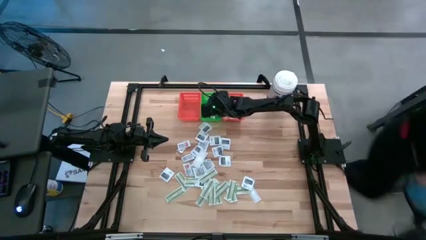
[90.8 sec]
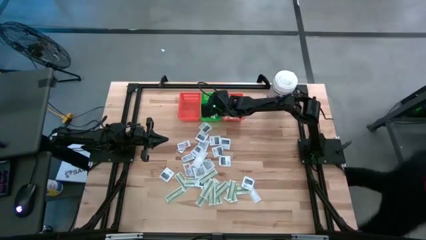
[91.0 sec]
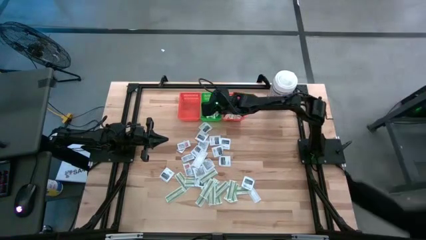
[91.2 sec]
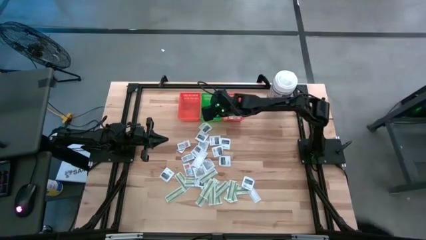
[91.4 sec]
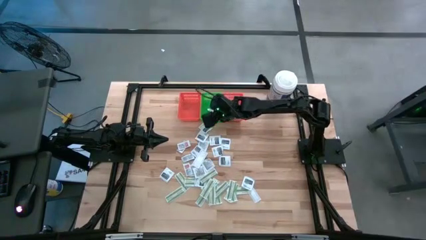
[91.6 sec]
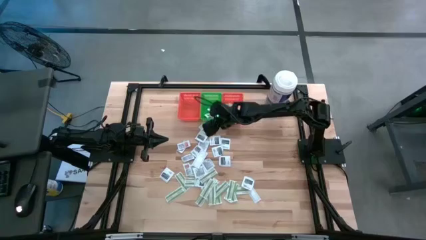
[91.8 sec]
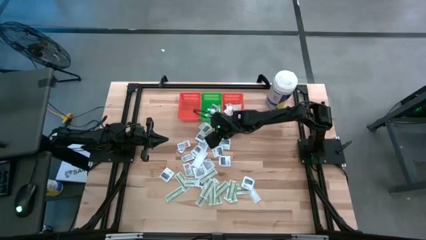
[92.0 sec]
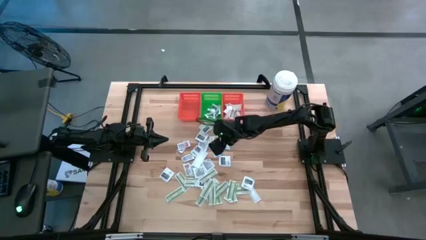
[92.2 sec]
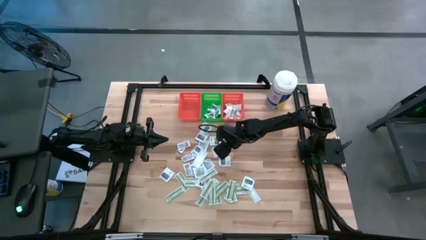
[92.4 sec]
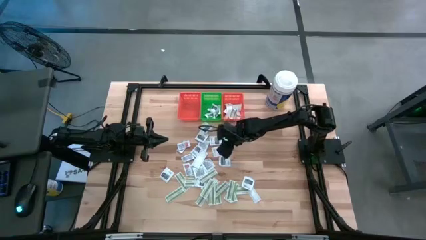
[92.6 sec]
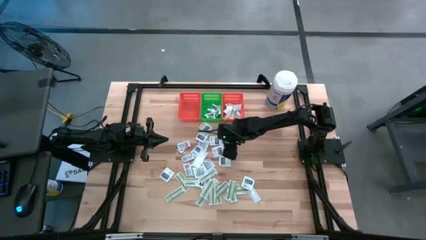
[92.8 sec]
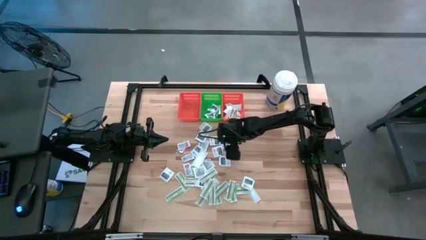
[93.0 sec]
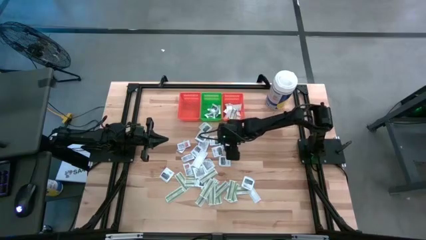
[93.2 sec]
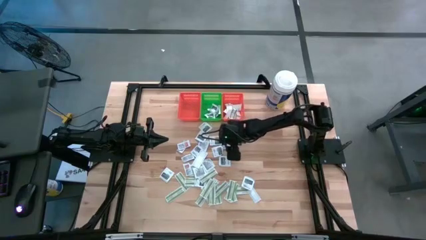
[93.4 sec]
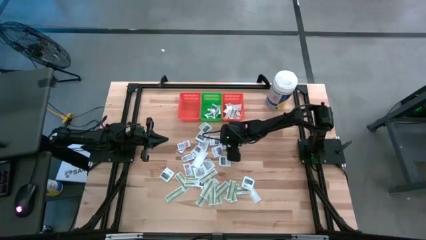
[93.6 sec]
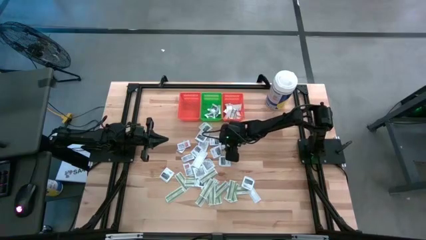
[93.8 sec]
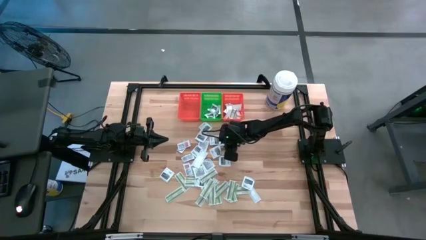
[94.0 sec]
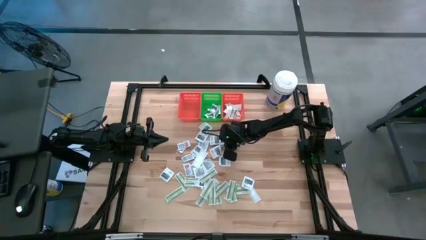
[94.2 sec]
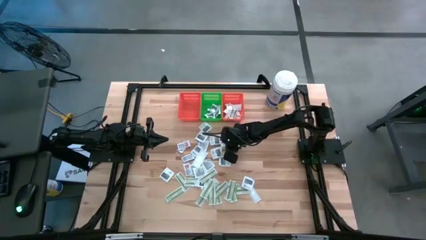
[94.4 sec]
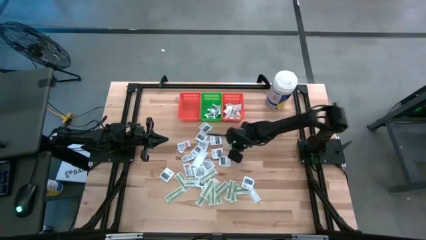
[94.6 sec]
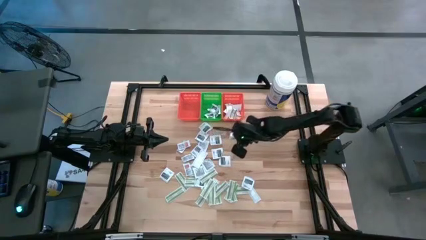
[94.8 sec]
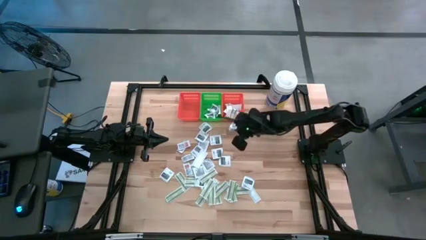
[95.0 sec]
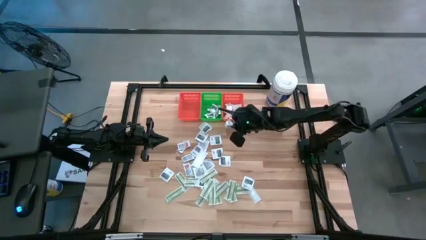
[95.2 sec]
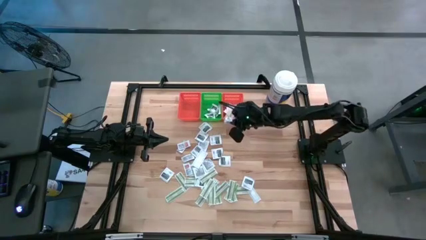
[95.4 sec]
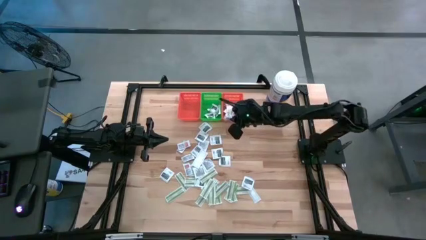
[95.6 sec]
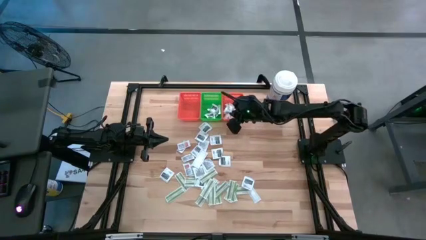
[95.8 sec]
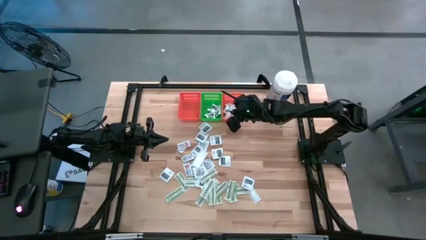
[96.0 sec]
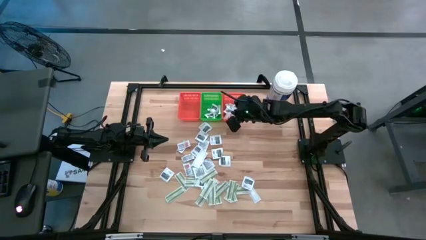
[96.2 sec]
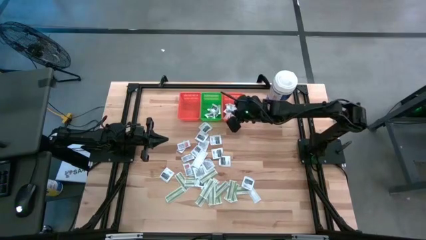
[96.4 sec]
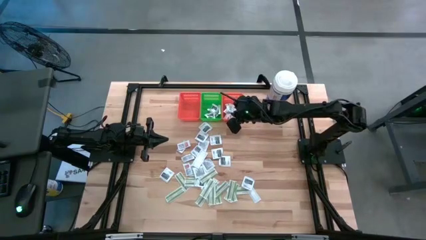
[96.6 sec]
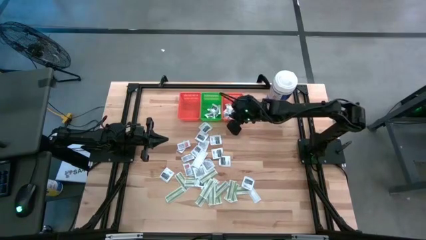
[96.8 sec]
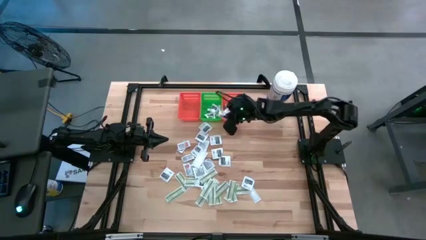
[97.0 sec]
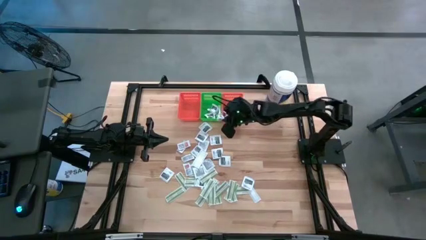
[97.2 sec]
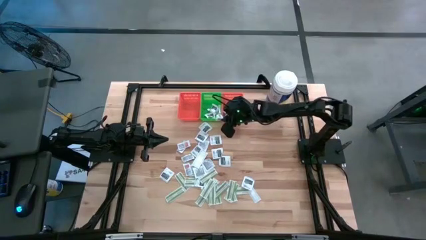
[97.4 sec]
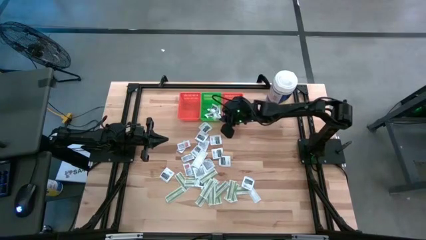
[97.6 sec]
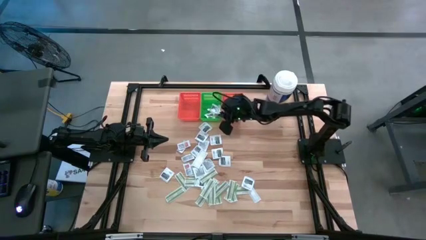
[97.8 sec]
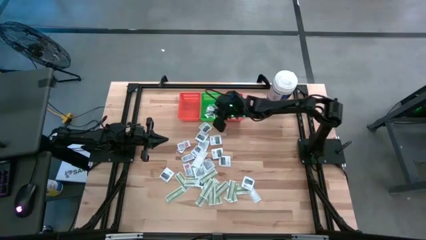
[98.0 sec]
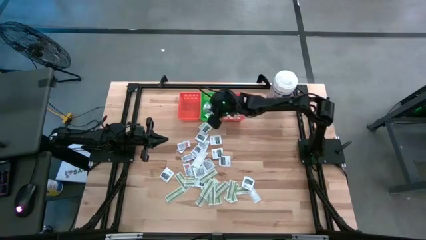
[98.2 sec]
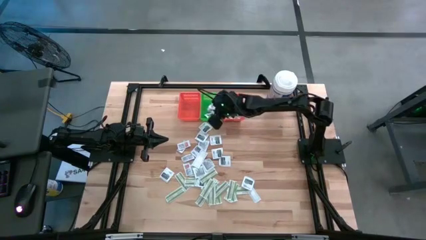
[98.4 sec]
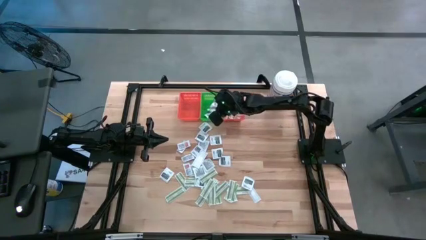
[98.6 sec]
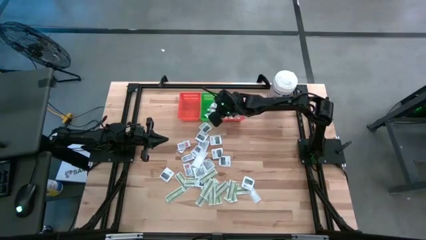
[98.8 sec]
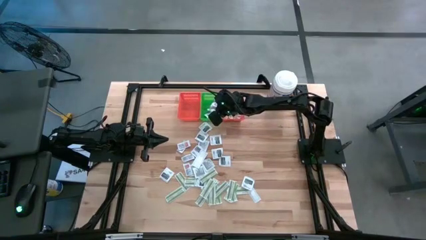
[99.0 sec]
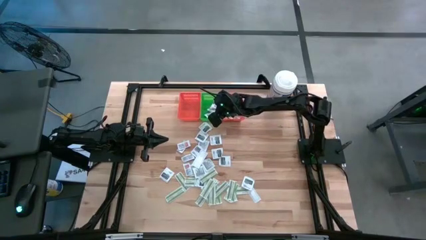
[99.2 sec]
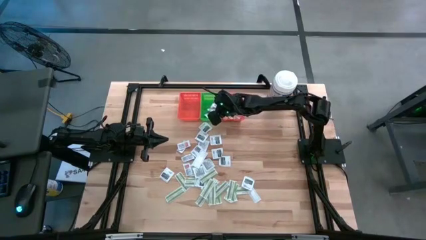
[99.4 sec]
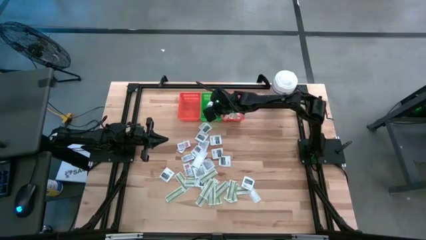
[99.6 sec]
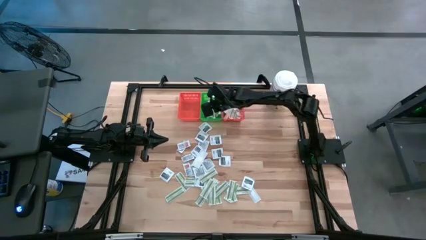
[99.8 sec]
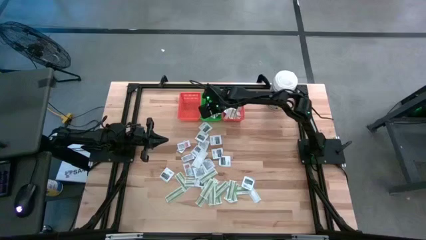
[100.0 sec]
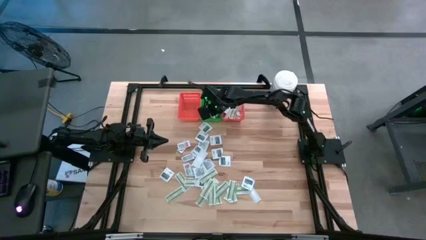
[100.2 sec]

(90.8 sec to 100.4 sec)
Task: Pick & Place First Aid Supplies
Put the towelette pack into the green bin

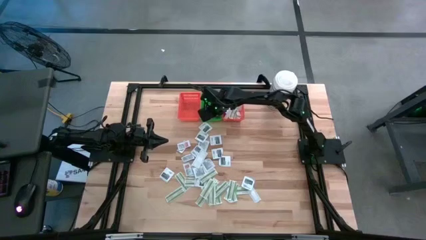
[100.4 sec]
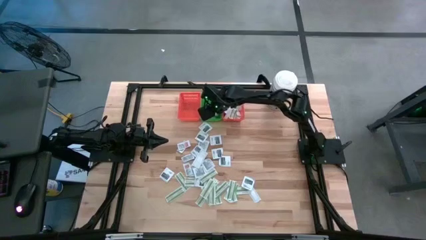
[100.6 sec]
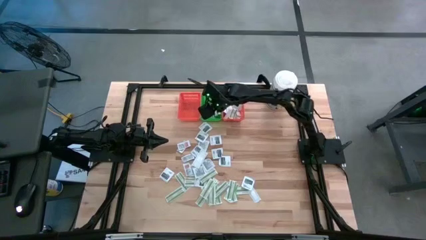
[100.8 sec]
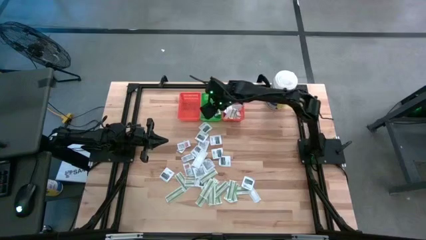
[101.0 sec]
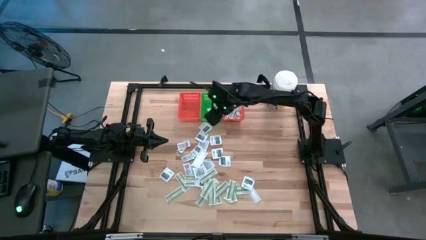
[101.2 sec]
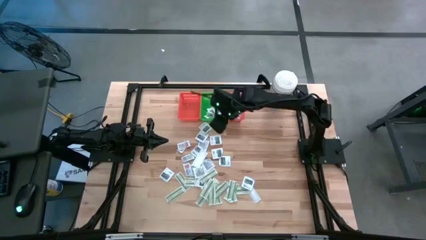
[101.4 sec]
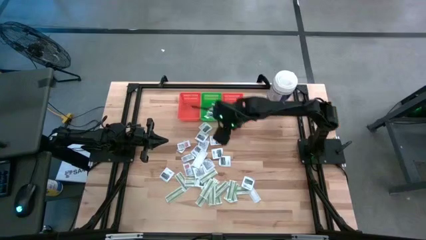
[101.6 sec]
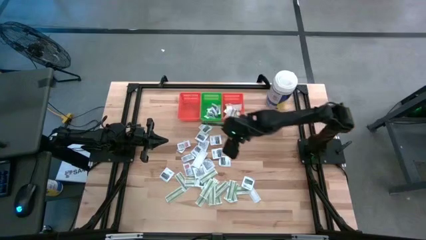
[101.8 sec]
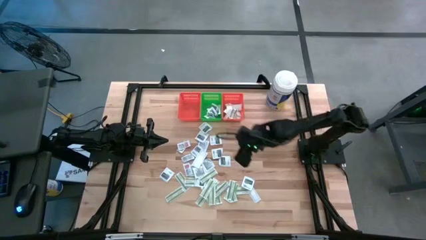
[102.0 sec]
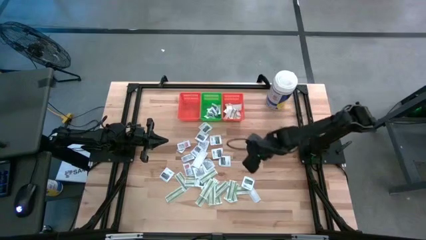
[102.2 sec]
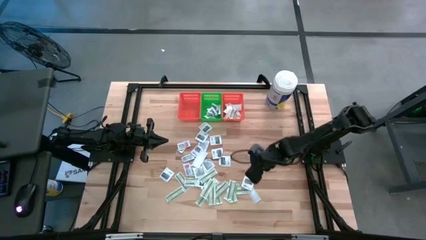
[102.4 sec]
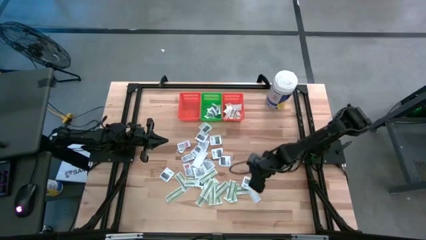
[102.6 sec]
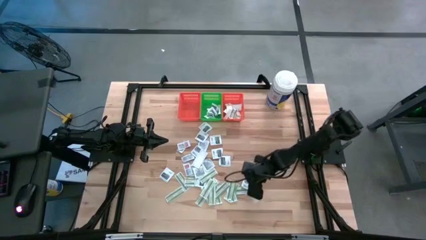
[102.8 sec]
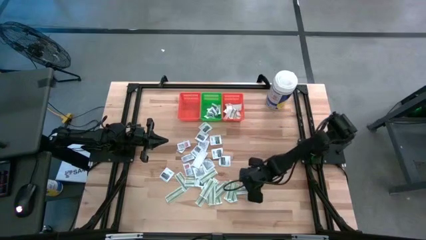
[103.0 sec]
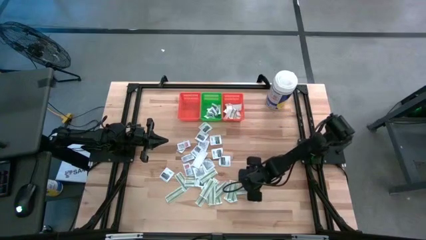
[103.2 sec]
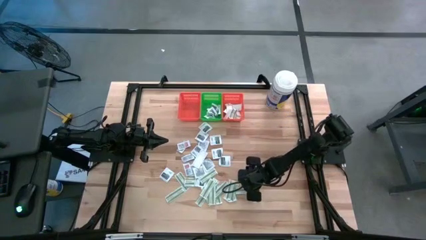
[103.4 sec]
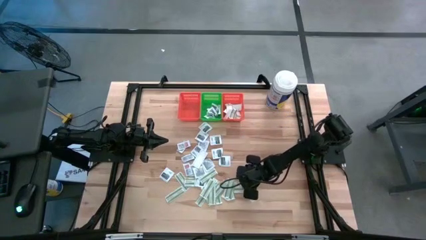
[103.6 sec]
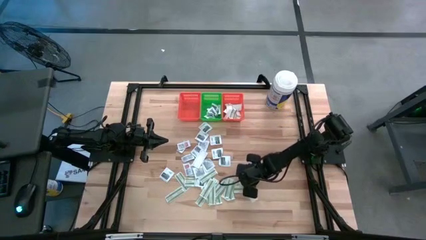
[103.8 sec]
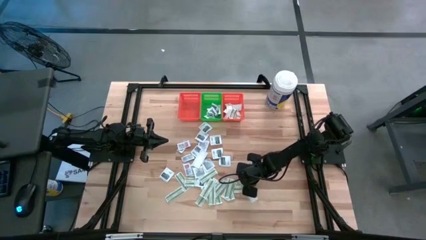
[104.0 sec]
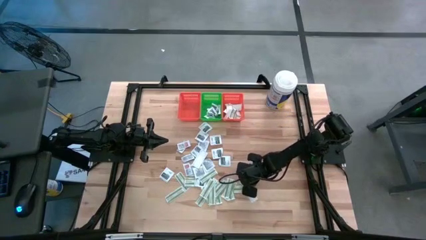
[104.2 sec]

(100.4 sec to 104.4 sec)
Put the towelette pack into the green bin

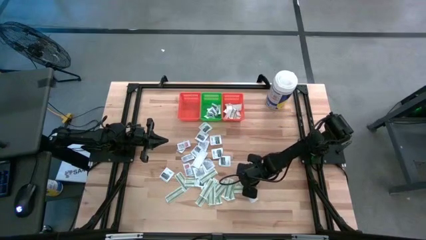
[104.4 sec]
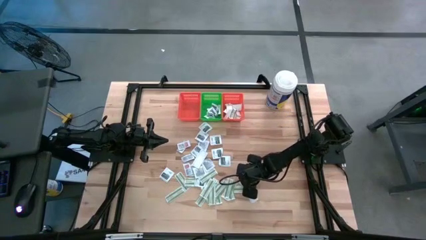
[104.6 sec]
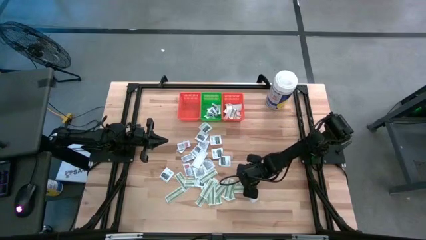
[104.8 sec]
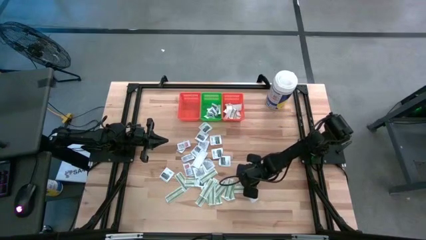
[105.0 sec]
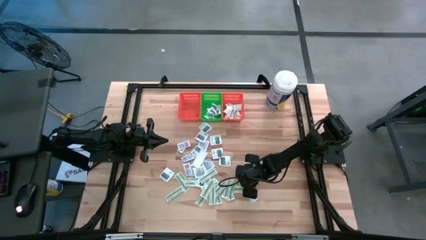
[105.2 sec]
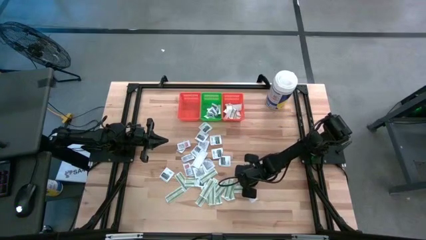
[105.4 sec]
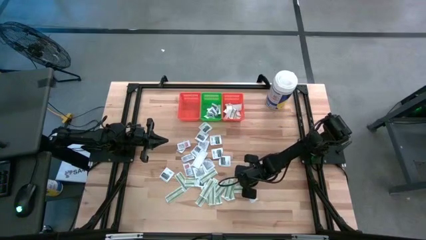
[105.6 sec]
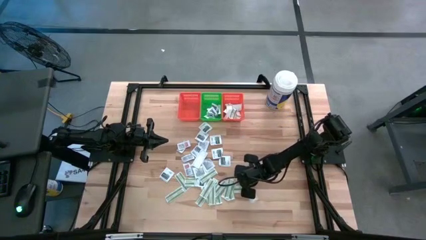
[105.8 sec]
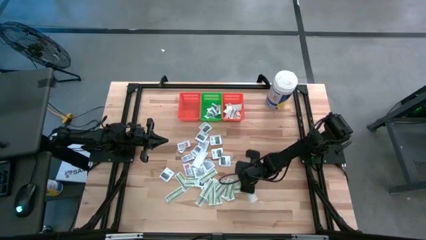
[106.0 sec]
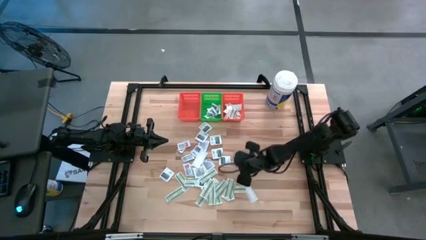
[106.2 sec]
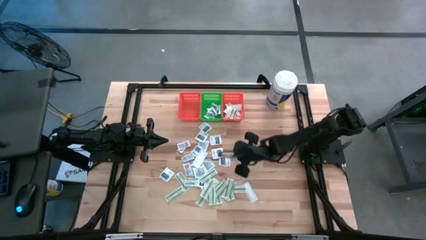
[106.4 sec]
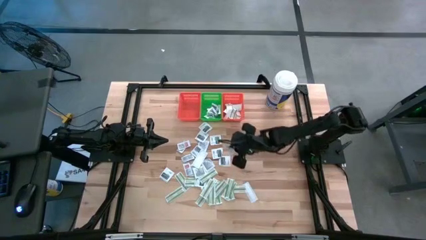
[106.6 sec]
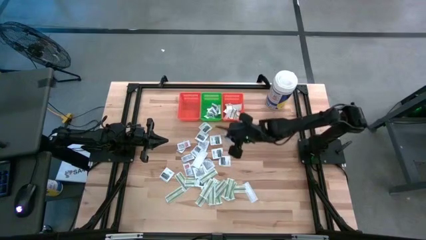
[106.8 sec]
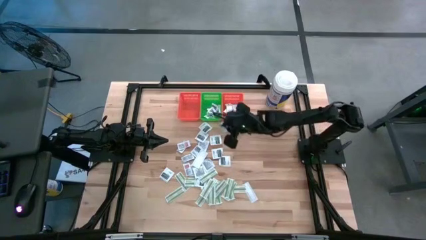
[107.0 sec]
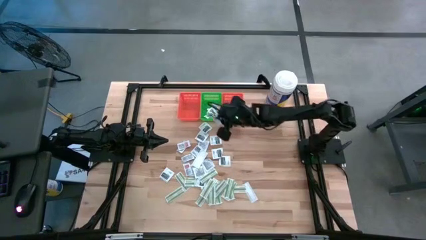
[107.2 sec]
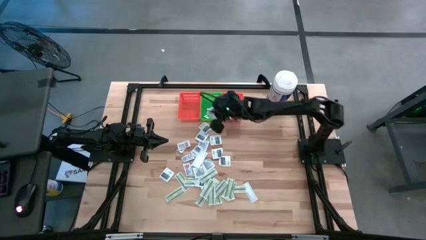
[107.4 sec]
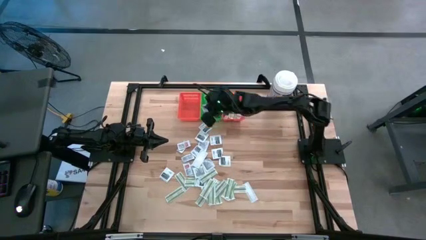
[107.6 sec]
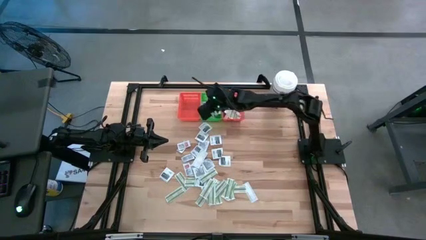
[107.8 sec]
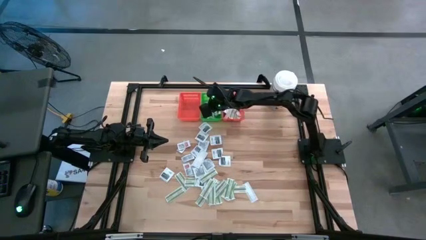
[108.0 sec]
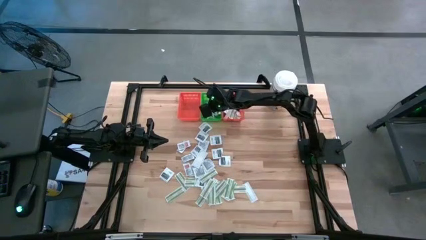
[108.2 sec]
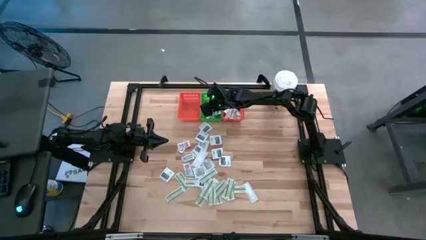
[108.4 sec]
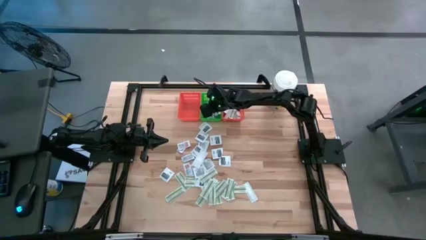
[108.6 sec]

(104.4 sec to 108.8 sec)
Put the towelette pack into the green bin
